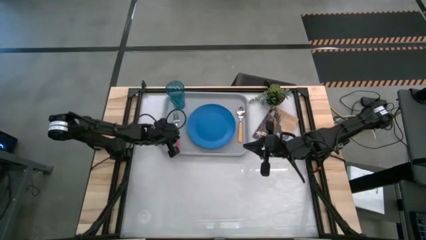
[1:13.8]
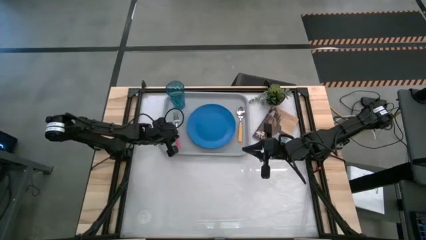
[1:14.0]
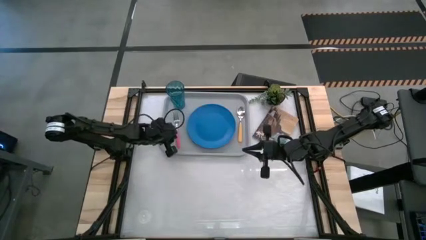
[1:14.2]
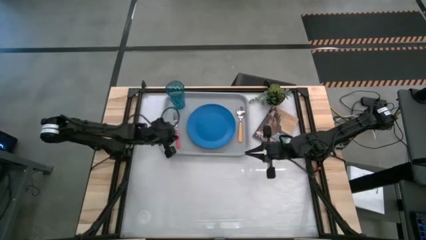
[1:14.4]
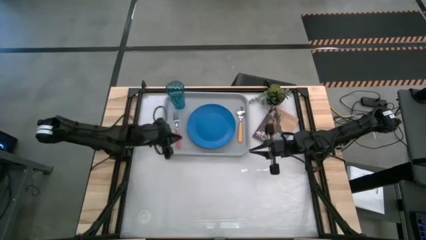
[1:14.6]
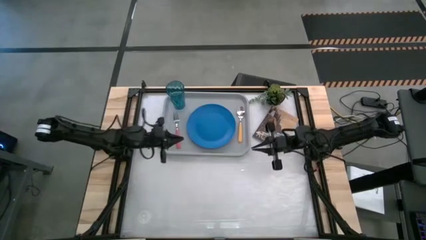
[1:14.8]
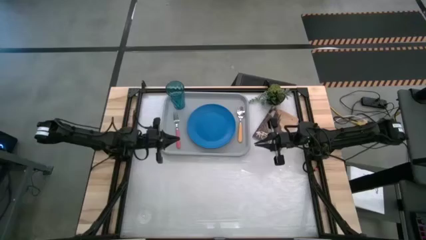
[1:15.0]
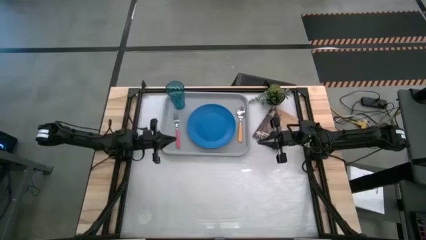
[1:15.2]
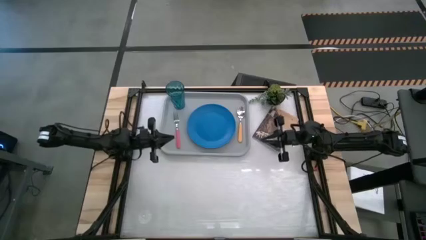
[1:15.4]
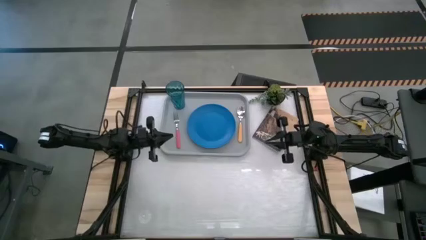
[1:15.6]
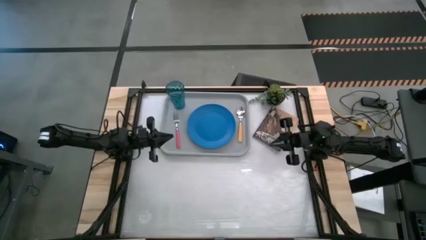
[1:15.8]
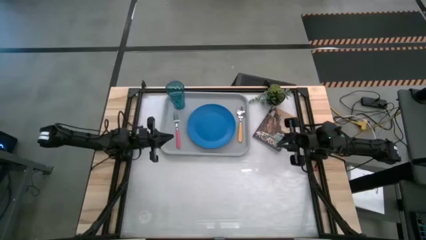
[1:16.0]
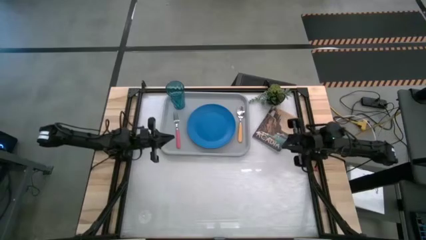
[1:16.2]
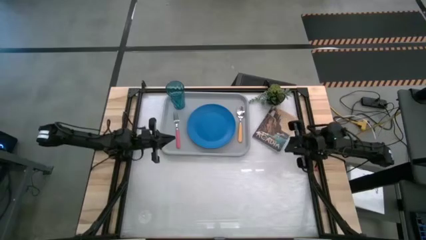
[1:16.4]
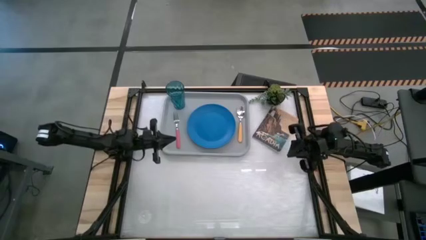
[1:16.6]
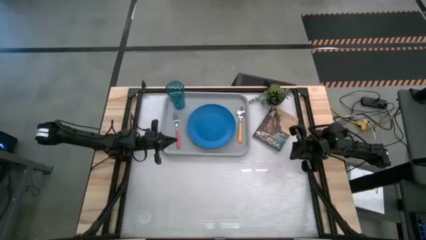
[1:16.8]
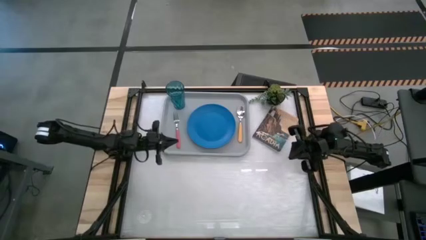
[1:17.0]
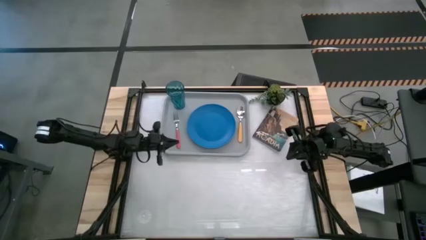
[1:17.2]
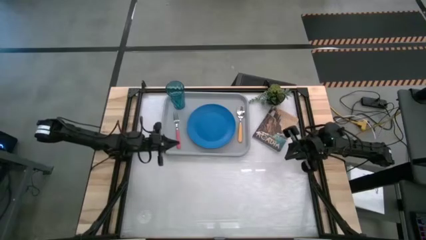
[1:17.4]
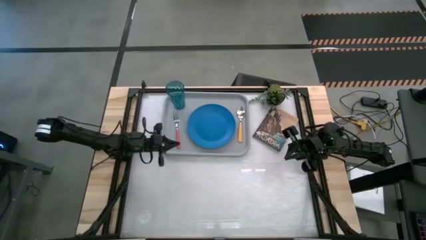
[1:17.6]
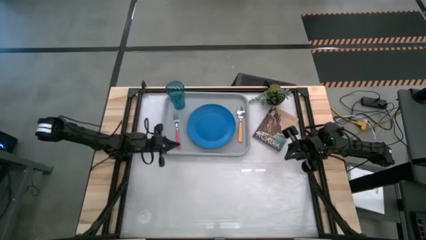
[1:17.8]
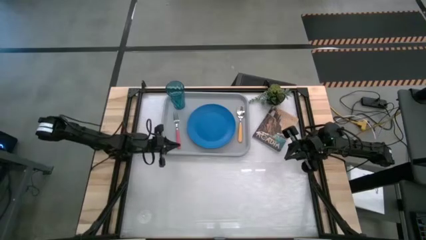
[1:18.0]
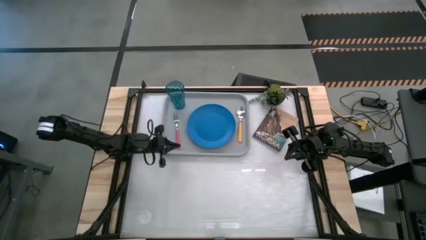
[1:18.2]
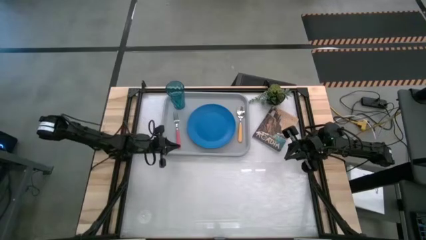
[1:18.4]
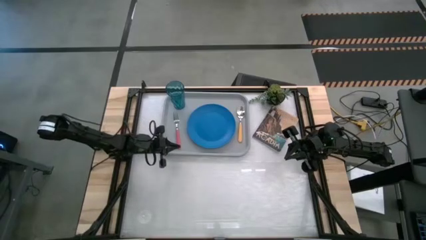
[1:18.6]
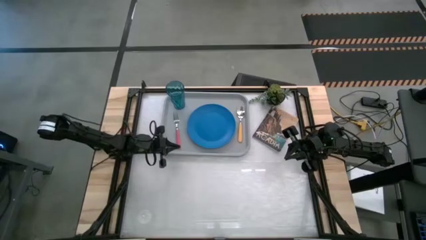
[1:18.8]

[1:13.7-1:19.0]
Task: Pick and place plate/cup/fork/spoon on tray
Return to Home Position

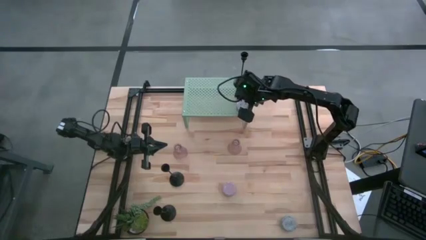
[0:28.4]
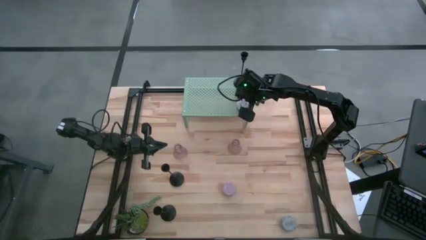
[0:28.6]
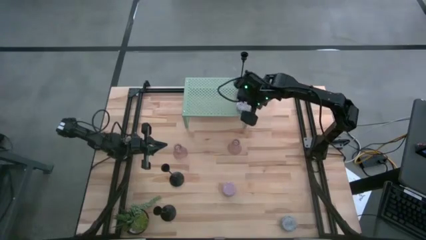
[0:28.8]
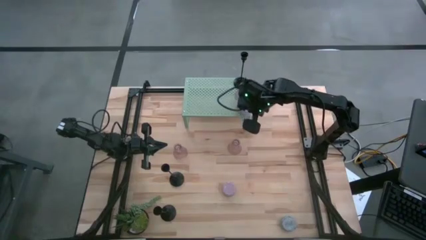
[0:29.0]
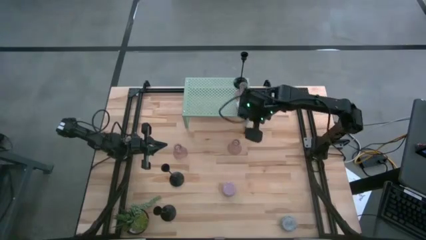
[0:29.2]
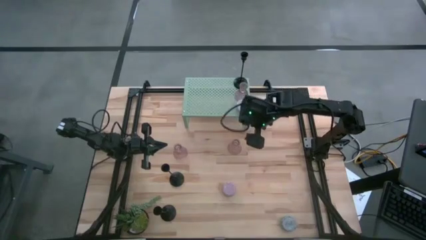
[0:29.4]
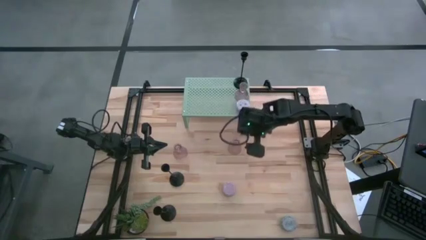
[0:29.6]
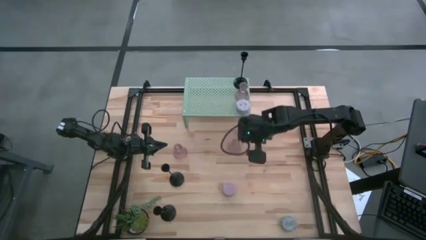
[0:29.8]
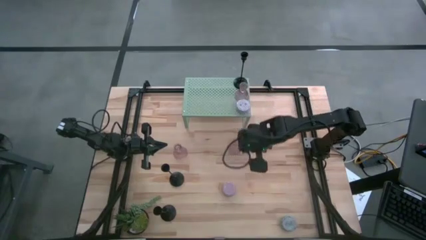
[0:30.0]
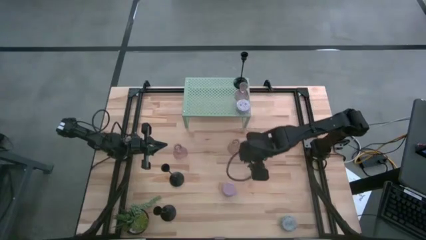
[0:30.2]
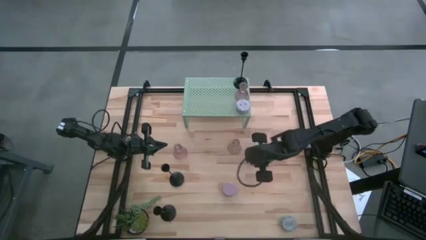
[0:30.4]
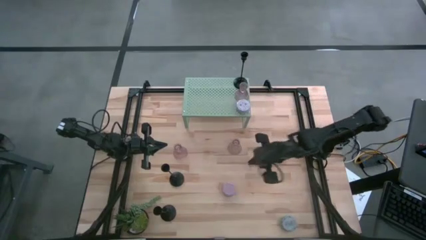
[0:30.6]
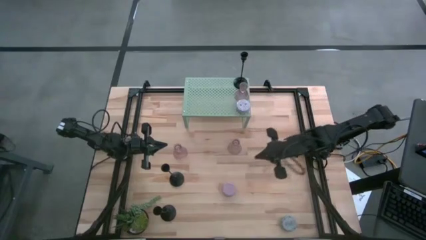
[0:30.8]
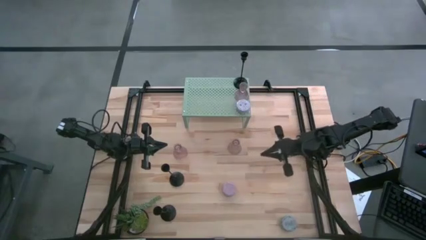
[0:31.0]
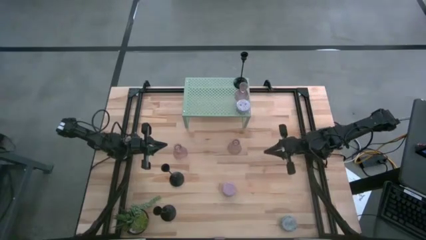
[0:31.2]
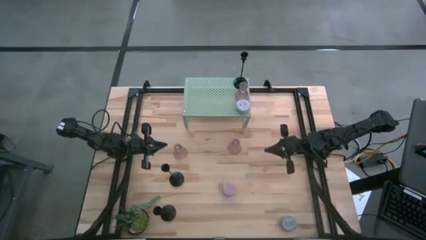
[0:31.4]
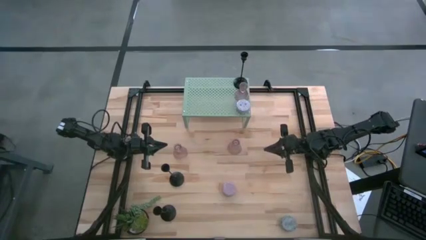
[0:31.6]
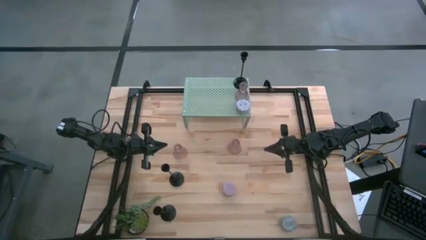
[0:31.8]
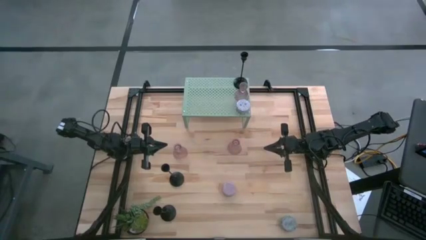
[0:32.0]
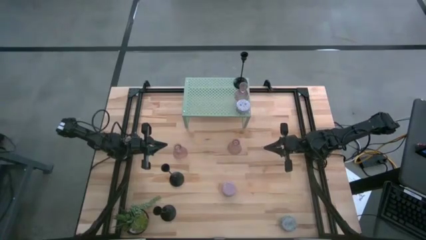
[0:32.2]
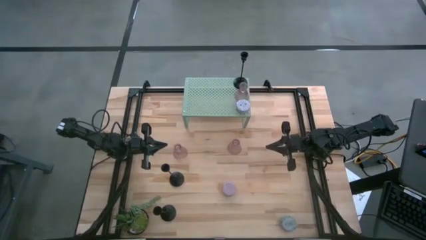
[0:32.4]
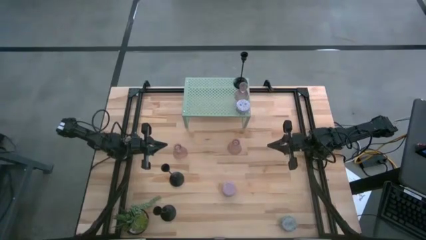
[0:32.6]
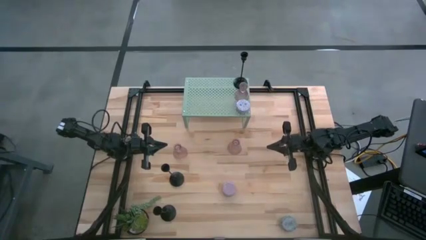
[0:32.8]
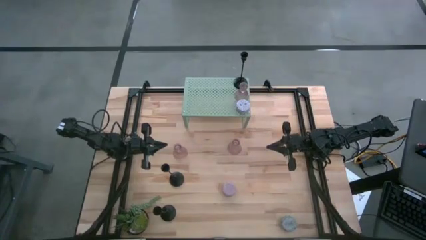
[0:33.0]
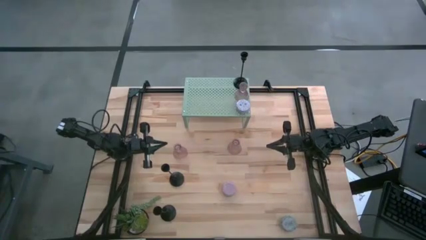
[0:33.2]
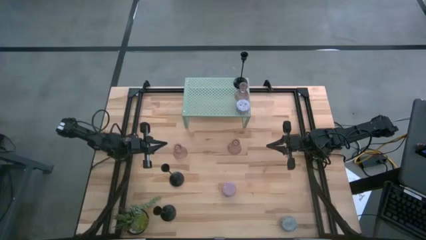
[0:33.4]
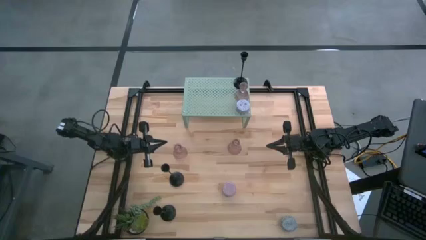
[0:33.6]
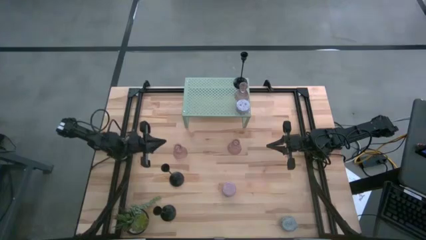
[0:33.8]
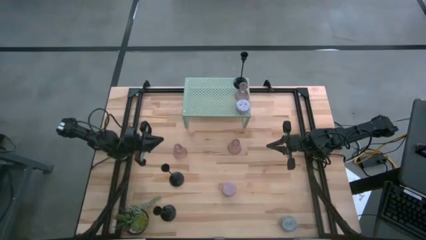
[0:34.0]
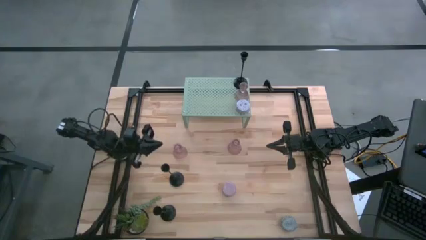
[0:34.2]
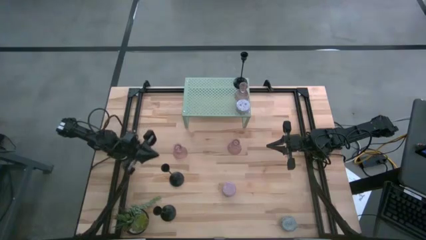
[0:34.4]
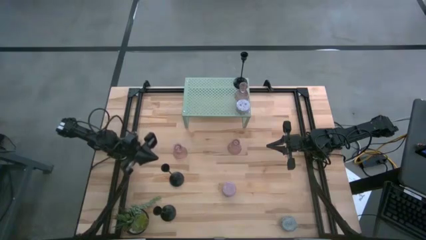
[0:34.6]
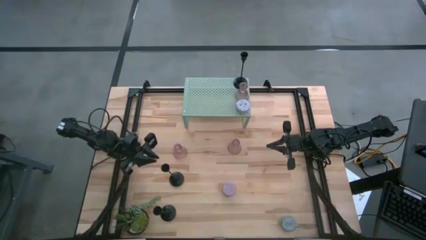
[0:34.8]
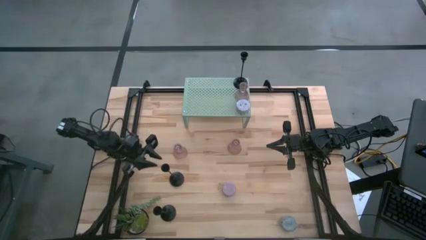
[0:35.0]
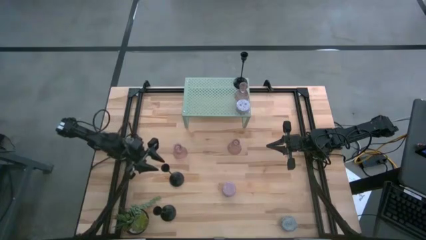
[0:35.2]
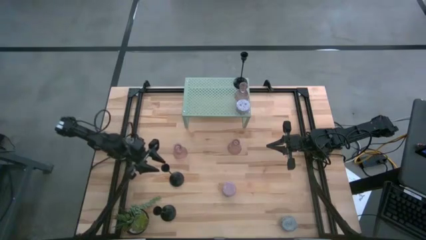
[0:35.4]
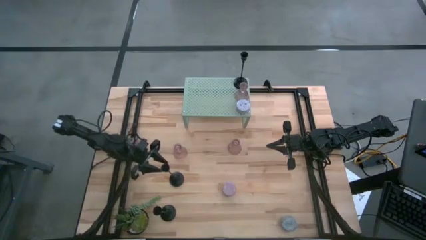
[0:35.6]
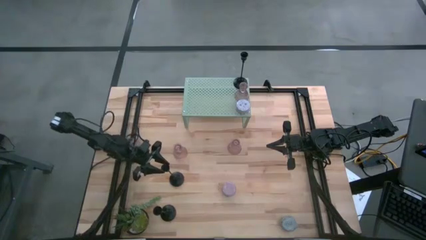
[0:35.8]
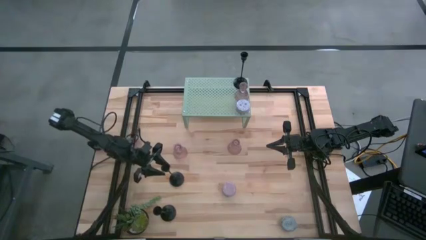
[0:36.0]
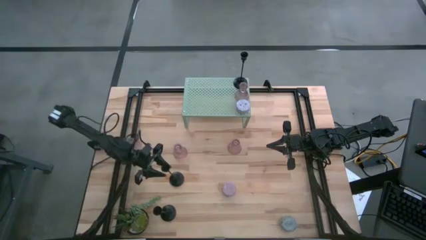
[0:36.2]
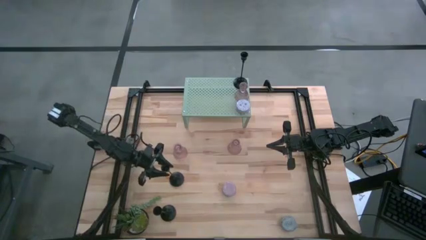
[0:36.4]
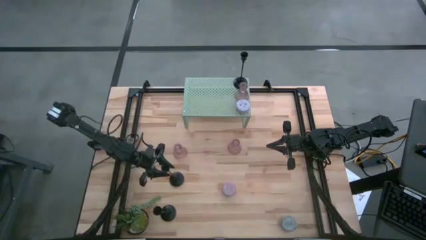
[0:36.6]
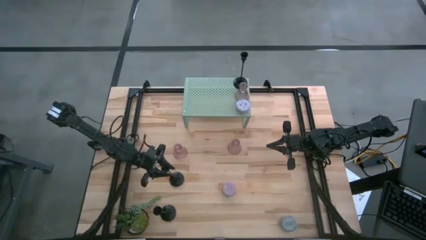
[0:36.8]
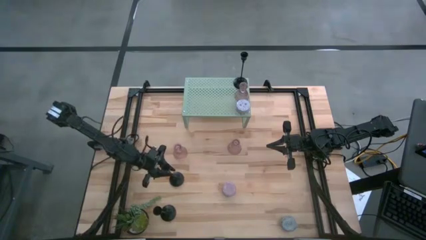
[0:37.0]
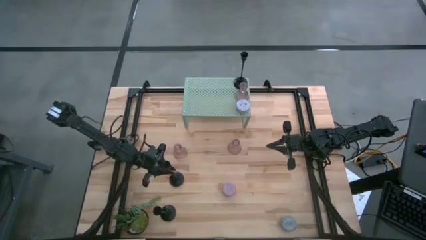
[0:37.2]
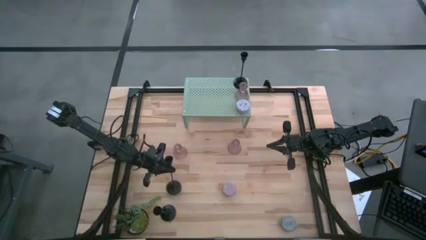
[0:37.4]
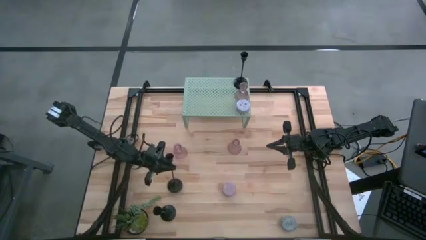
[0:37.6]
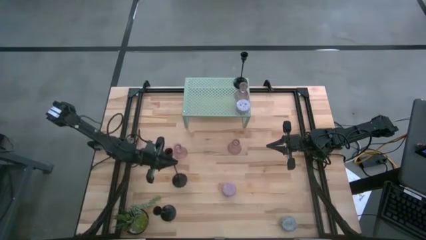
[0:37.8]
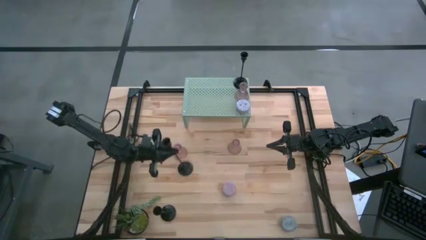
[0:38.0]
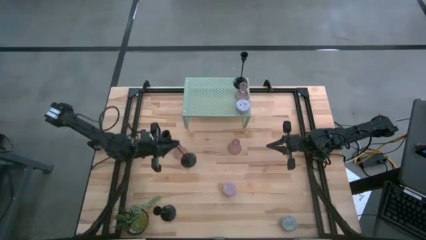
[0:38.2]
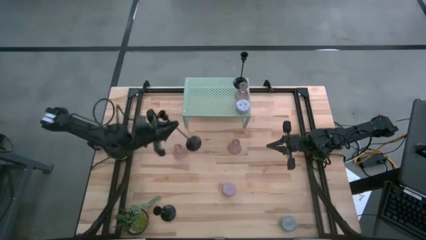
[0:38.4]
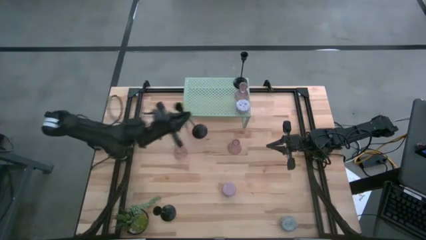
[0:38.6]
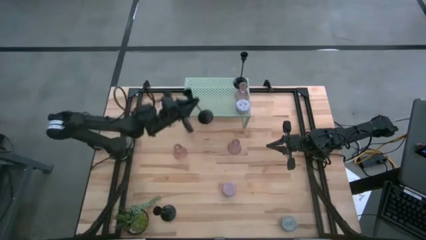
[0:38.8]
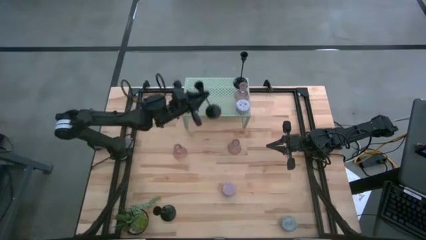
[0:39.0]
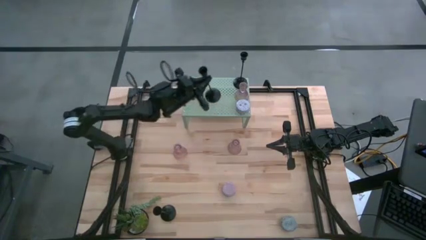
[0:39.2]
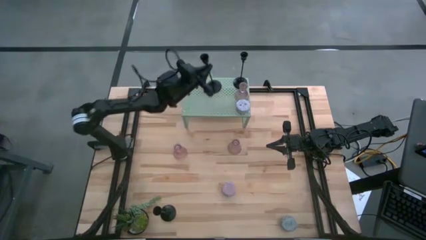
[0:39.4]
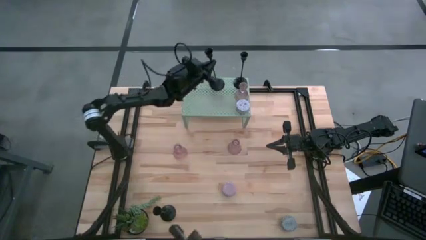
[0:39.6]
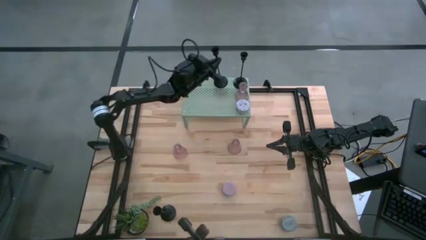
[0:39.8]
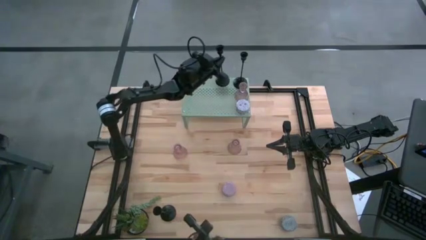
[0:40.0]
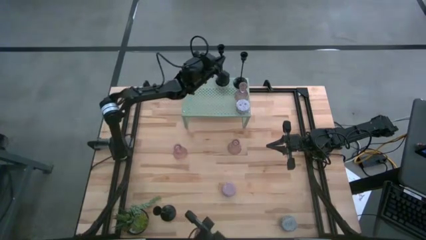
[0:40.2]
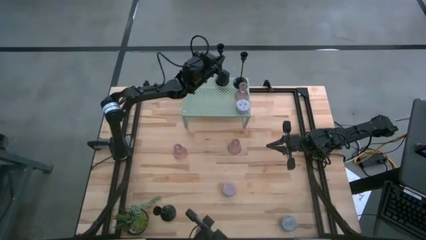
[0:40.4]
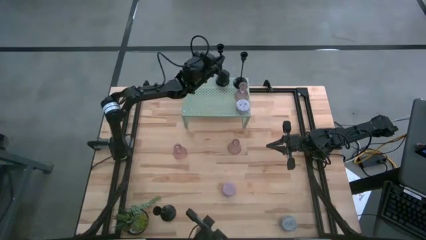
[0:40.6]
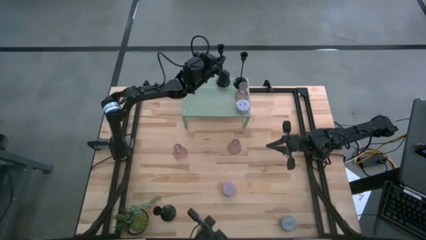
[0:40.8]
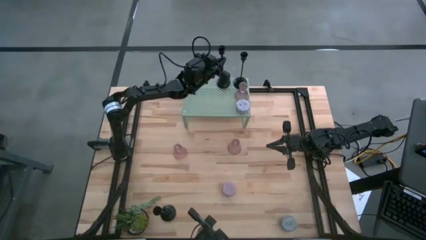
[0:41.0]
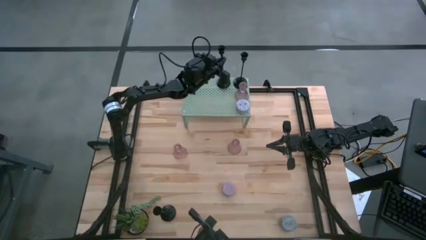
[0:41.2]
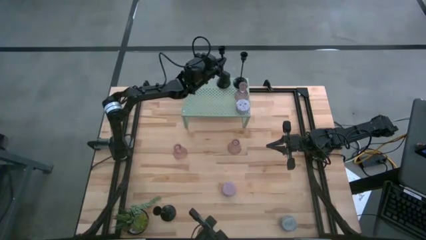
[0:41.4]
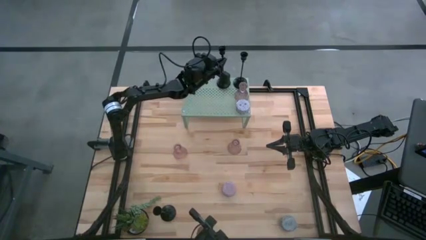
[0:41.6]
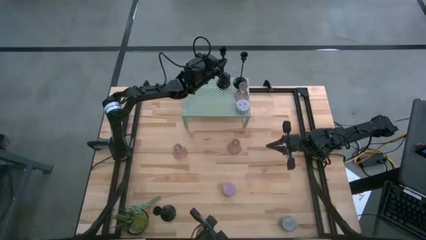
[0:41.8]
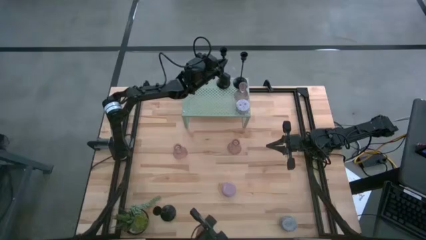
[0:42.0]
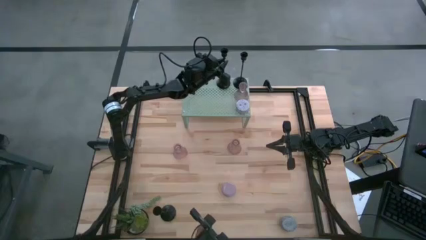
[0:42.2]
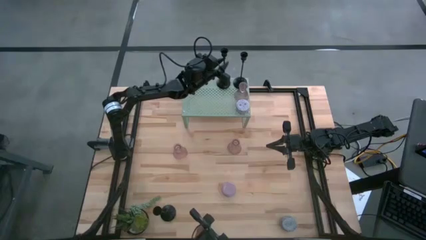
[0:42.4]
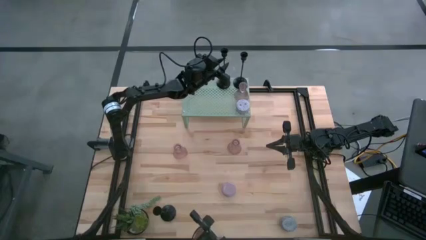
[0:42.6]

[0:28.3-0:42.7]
Task: Pick & Place candle stick holders
Put the top black candle holder on the shelf
